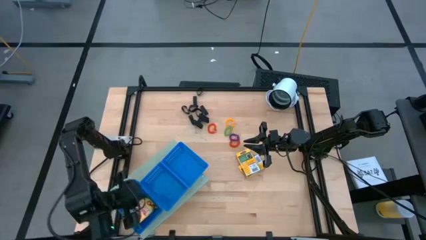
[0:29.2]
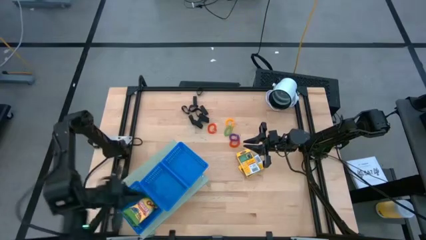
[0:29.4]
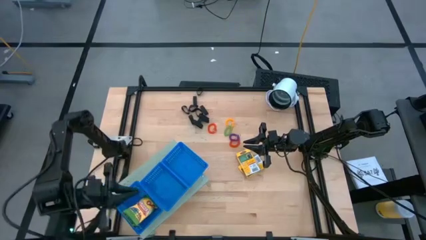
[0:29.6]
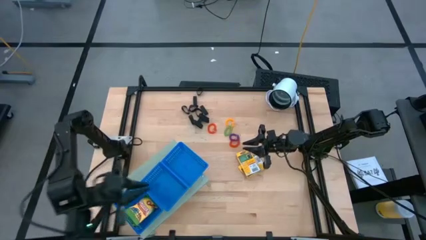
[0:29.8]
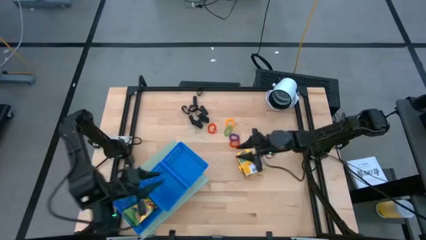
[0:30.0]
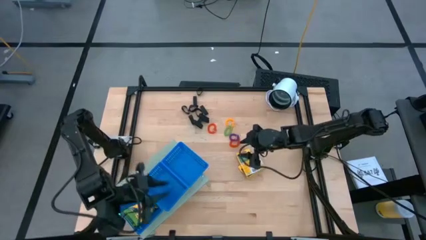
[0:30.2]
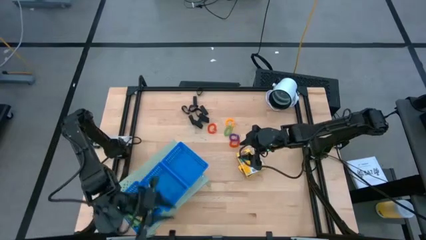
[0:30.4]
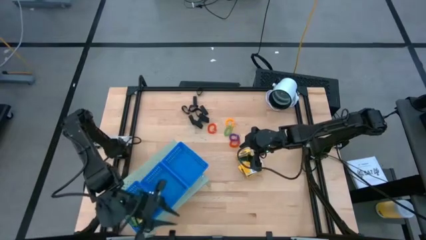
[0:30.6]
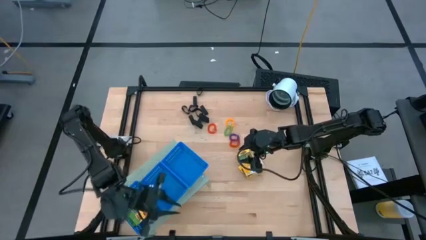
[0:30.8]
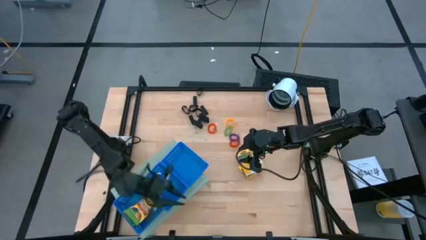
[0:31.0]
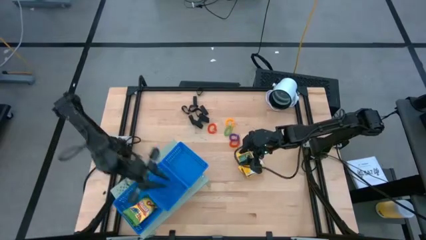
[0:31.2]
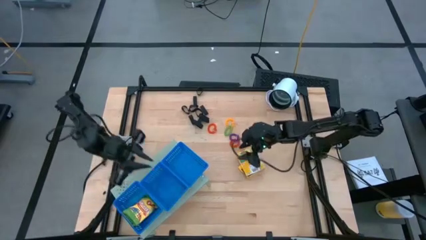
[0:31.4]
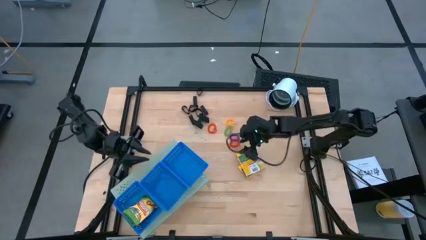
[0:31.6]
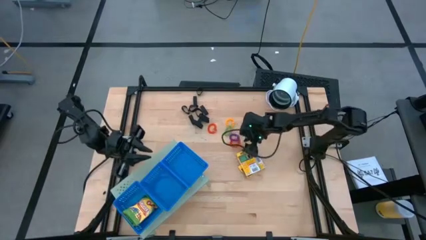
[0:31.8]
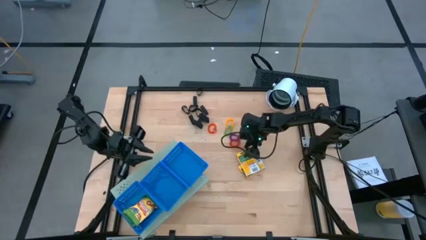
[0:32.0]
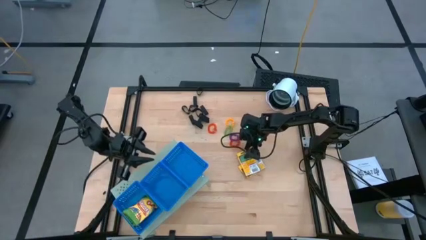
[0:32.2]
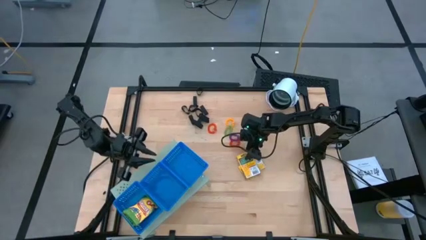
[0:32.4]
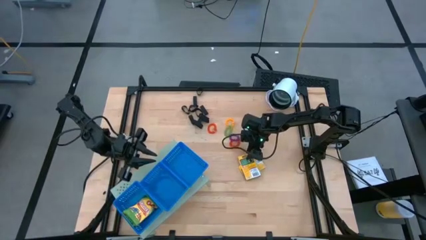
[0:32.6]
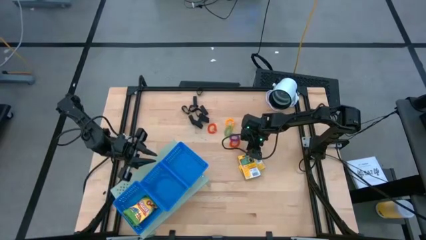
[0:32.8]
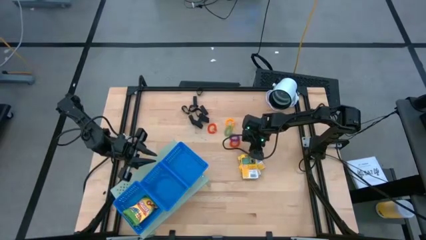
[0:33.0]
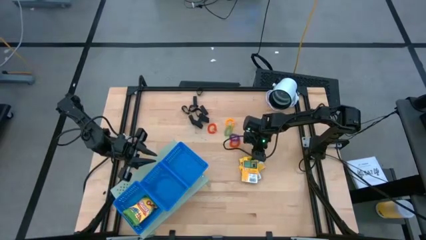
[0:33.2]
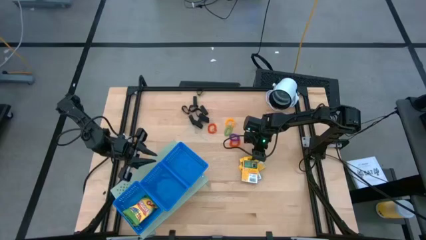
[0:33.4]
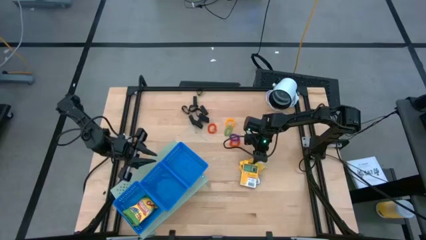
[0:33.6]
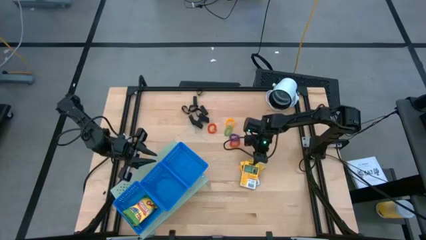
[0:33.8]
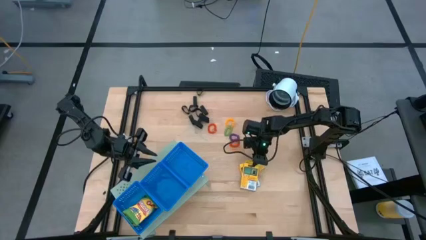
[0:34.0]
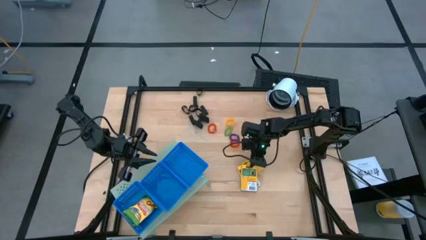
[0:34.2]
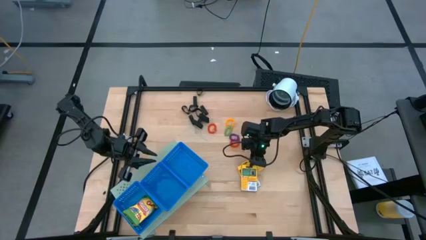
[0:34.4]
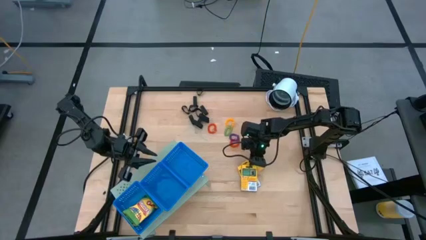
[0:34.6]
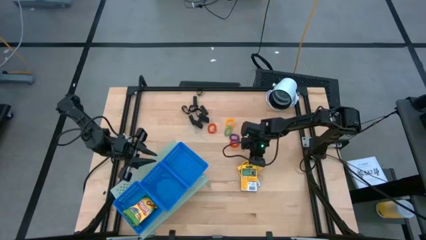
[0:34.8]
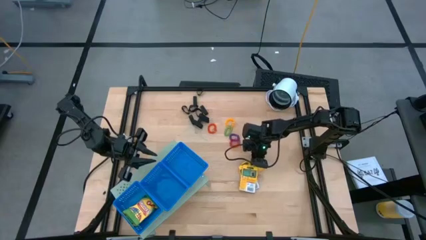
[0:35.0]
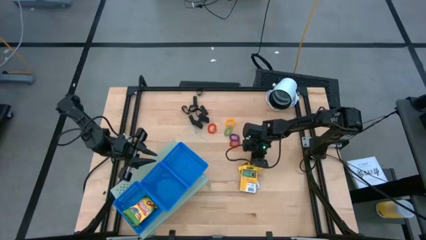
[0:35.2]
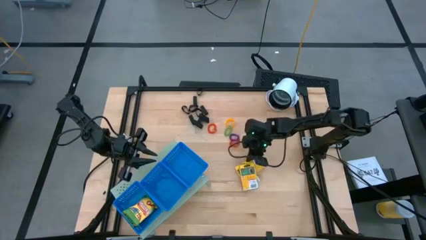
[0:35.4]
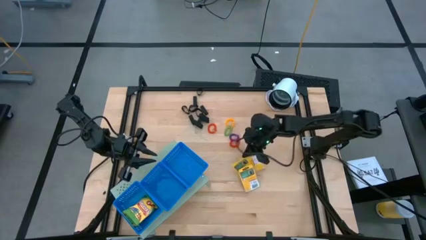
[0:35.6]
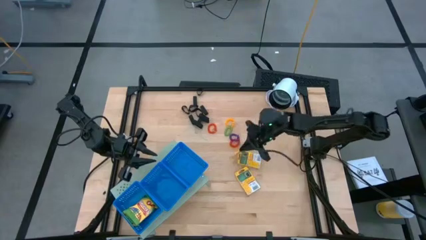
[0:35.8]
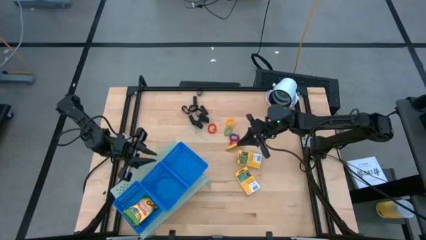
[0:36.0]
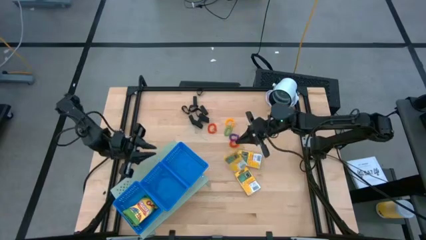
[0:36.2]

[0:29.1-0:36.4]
Task: Pick & Place Office Desk Supplies
Put the yellow crayon box into the bottom blue basket on the shelf

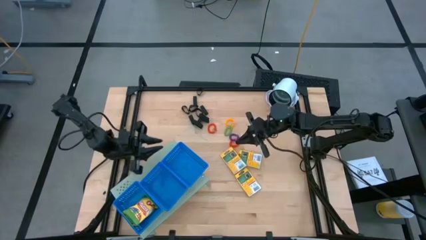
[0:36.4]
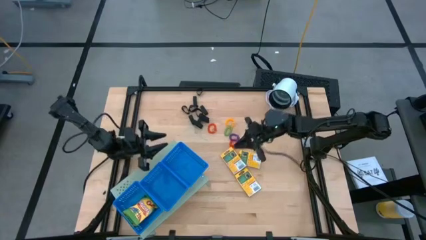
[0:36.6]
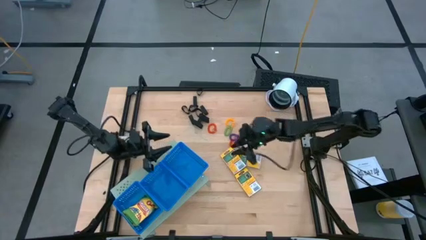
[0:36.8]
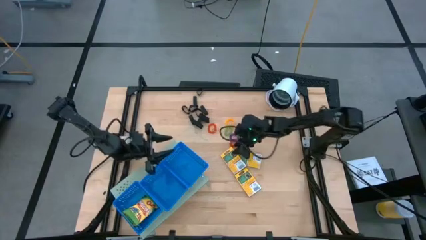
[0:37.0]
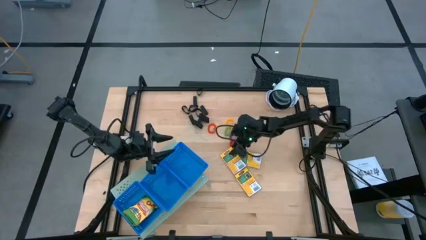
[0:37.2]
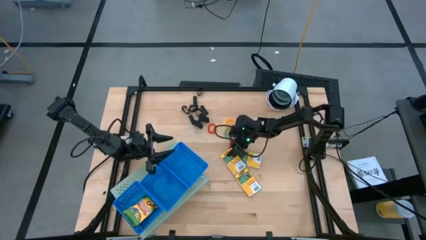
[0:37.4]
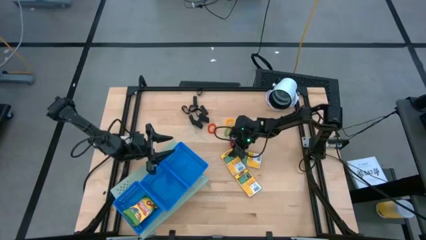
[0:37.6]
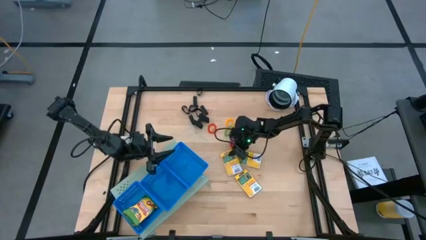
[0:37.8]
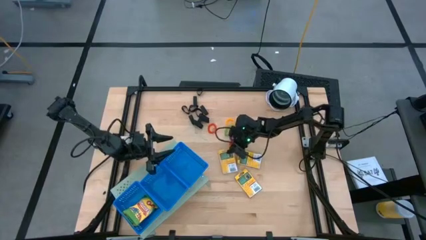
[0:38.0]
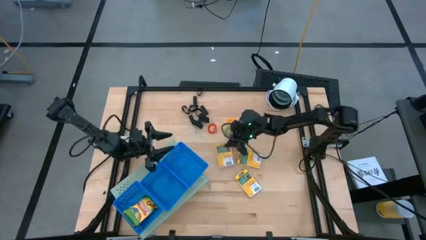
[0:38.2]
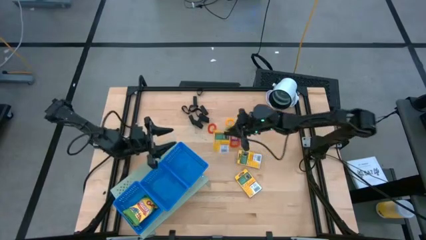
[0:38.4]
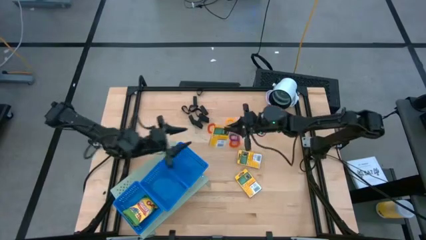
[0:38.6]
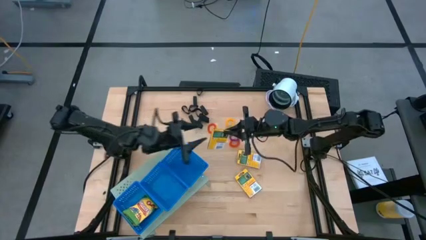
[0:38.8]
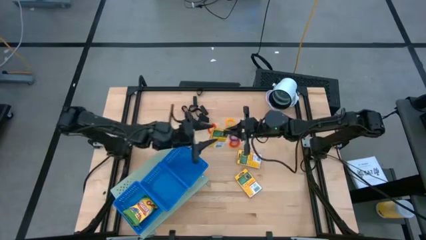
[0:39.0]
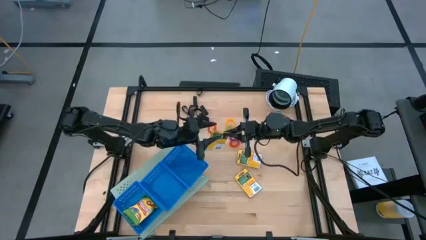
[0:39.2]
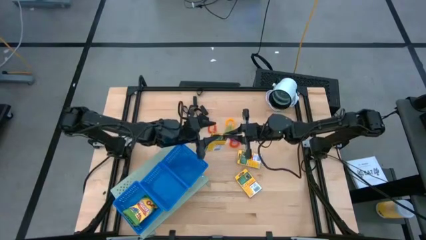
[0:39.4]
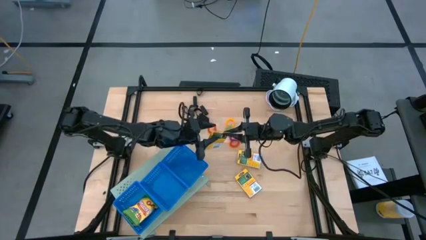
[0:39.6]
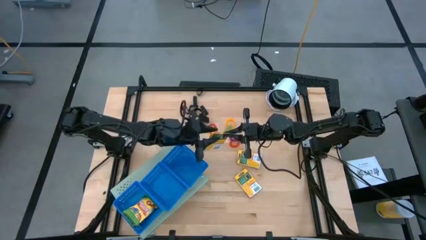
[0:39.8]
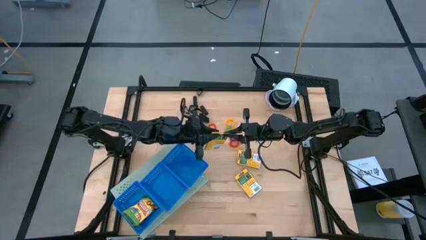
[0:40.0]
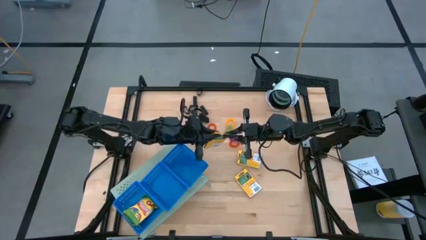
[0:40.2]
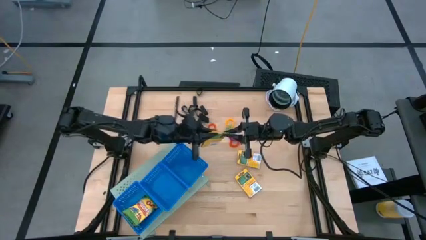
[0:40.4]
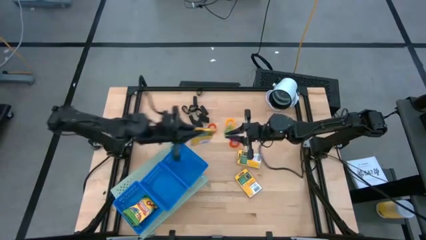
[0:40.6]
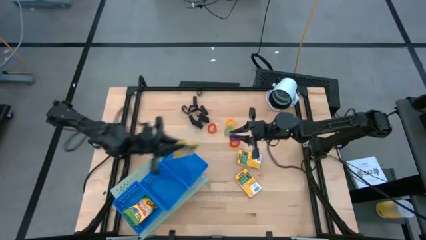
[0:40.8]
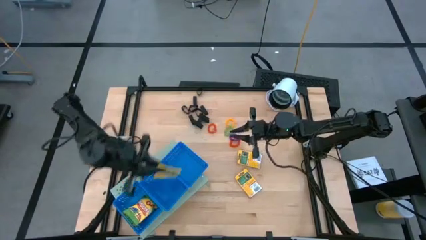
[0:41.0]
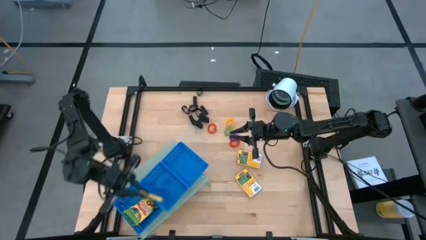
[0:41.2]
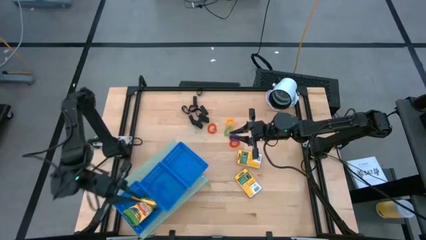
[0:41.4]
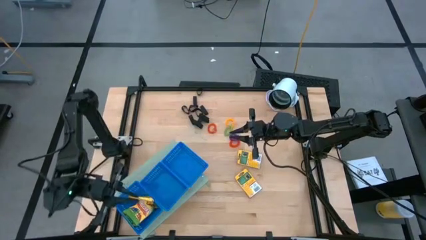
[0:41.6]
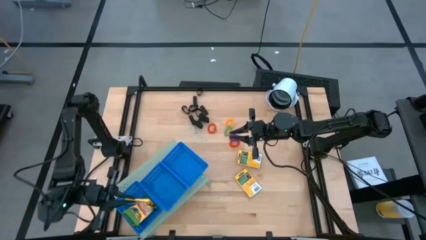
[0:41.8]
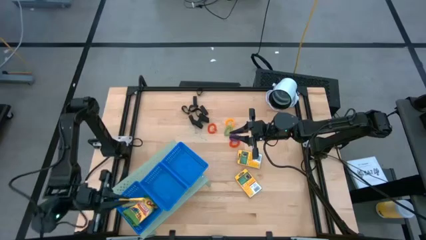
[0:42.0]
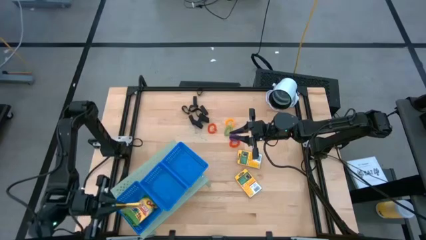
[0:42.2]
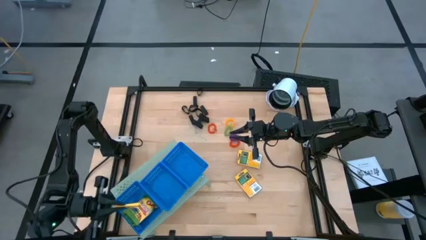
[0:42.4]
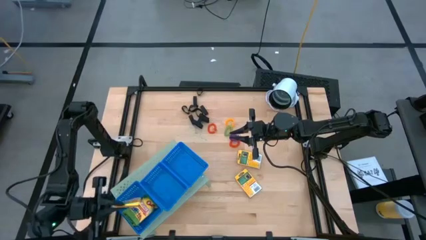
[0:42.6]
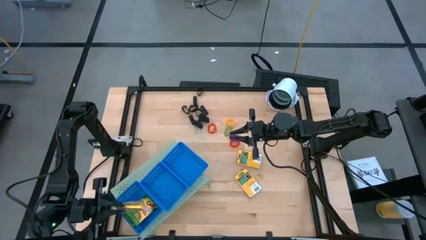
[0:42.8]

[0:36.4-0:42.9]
Put the yellow crayon box into the bottom blue basket on the shelf
